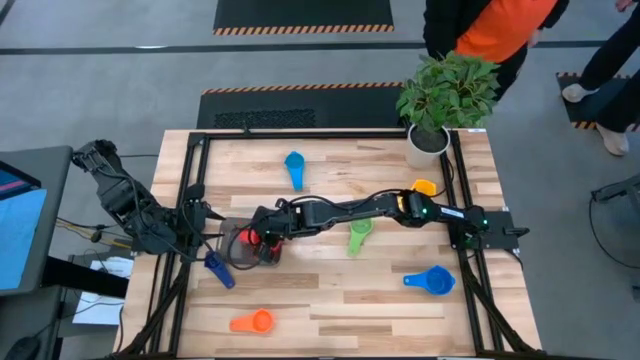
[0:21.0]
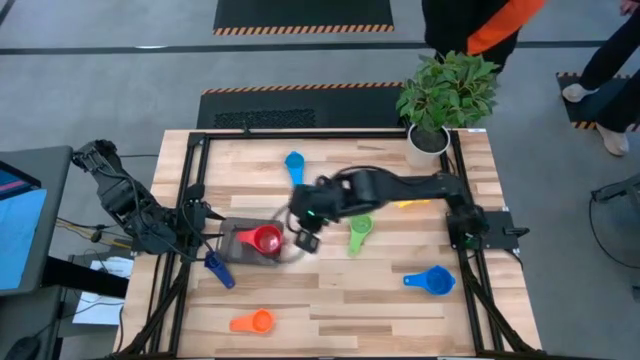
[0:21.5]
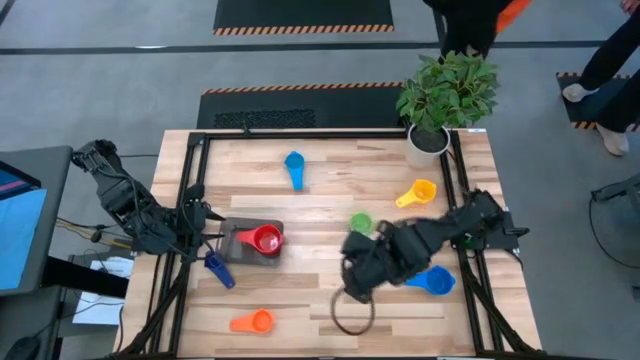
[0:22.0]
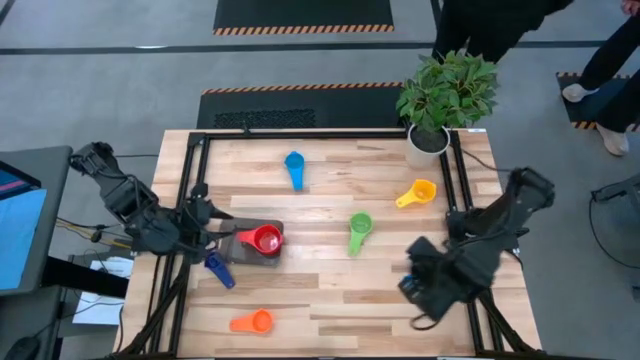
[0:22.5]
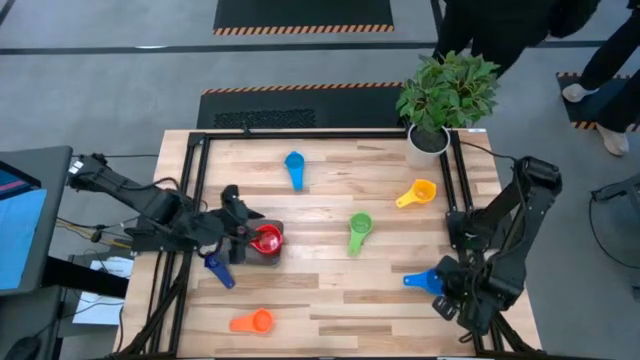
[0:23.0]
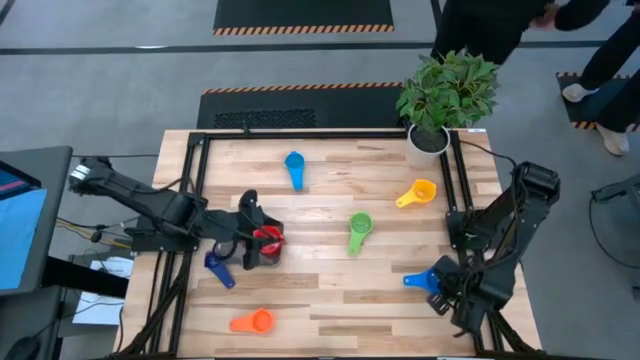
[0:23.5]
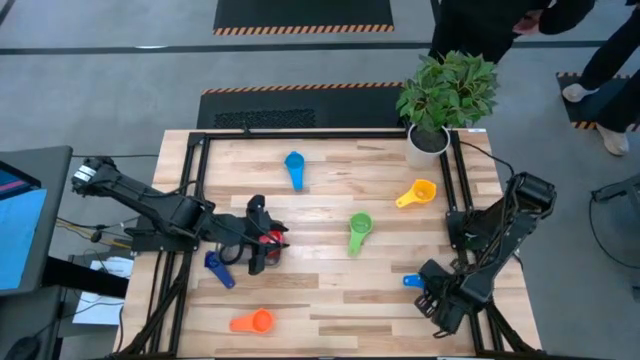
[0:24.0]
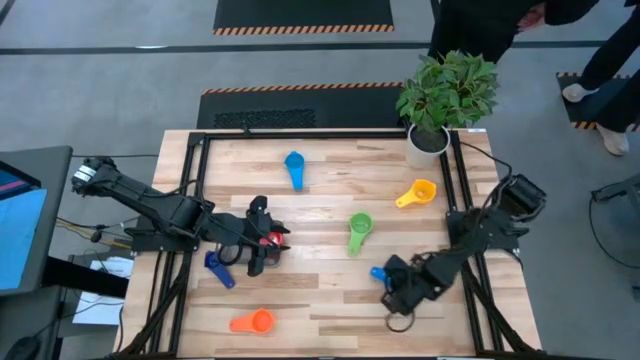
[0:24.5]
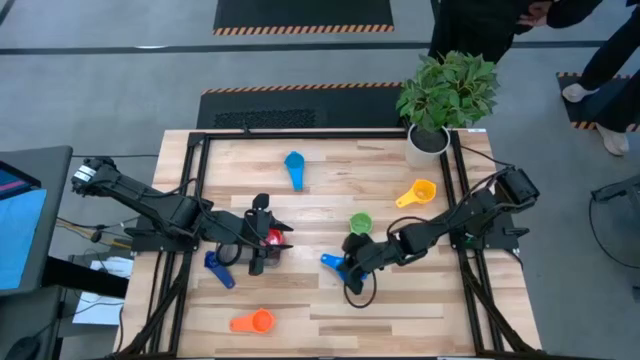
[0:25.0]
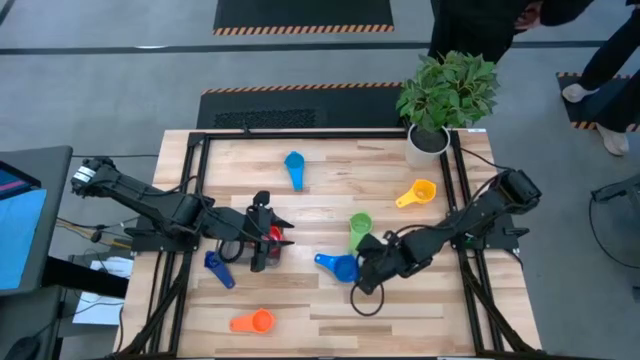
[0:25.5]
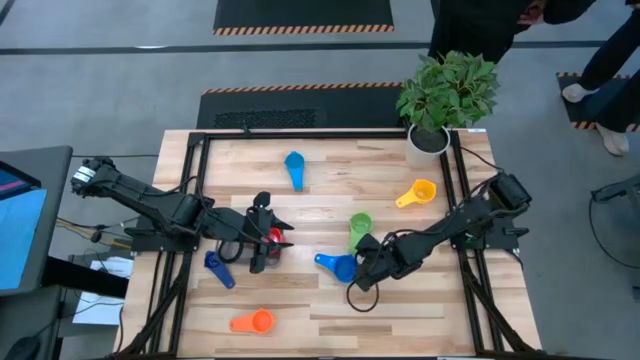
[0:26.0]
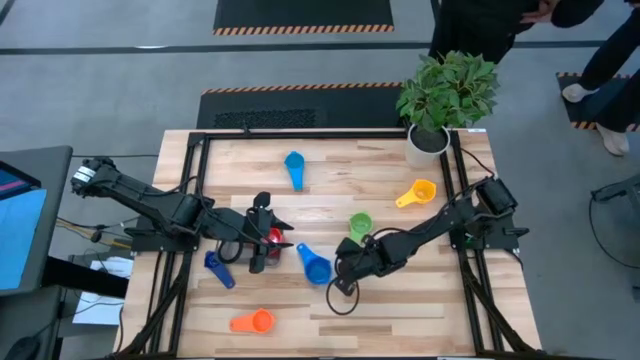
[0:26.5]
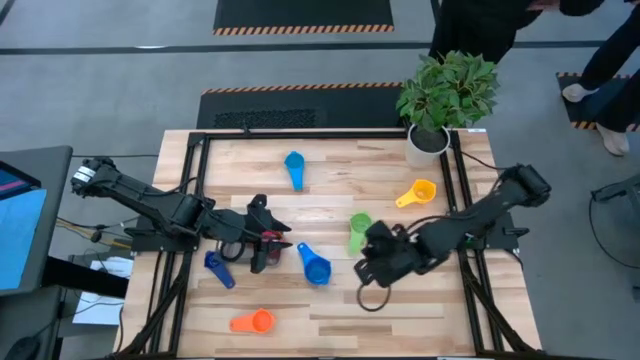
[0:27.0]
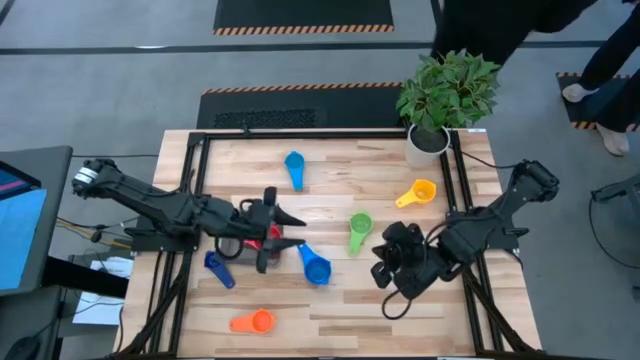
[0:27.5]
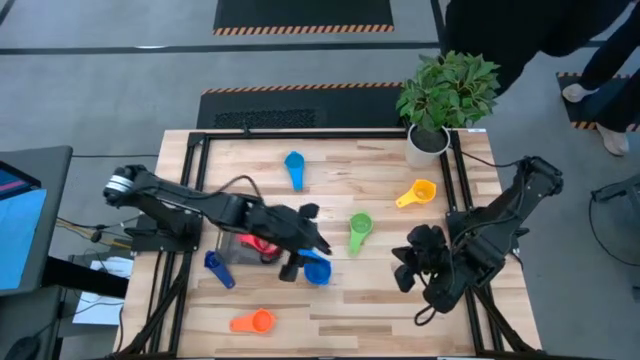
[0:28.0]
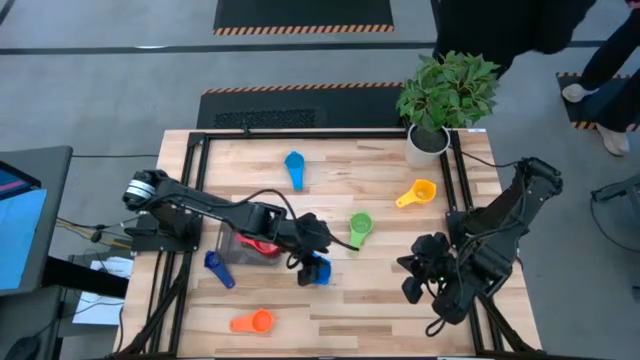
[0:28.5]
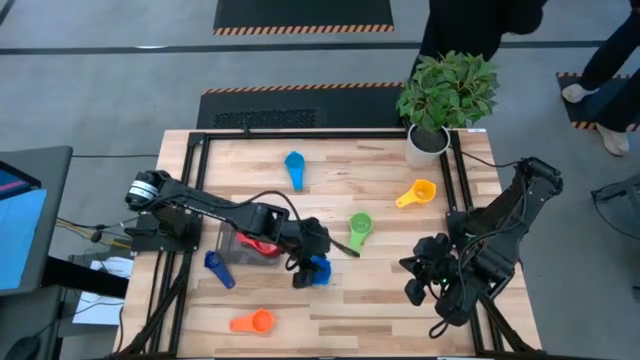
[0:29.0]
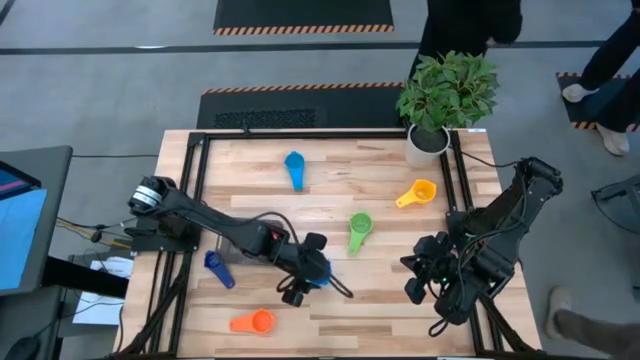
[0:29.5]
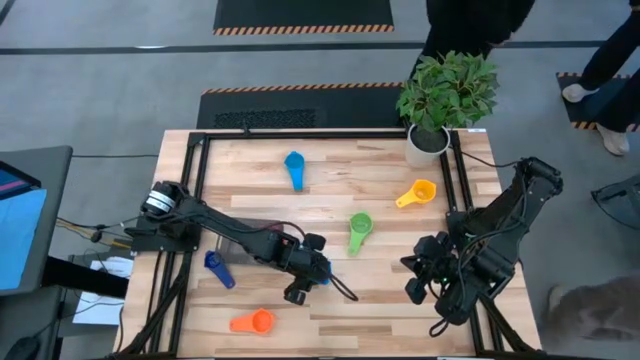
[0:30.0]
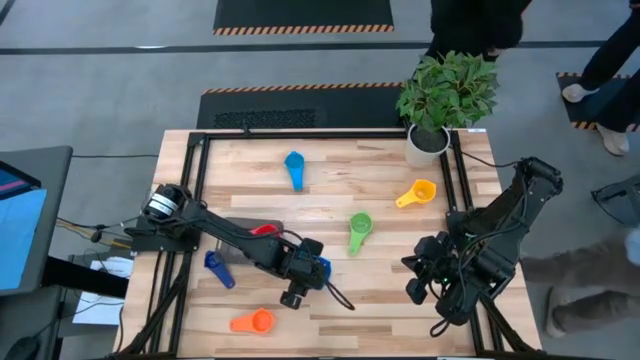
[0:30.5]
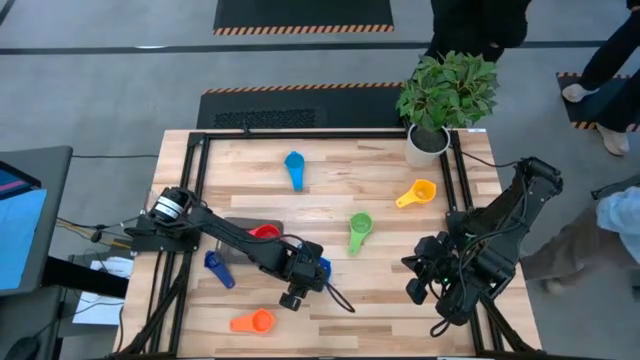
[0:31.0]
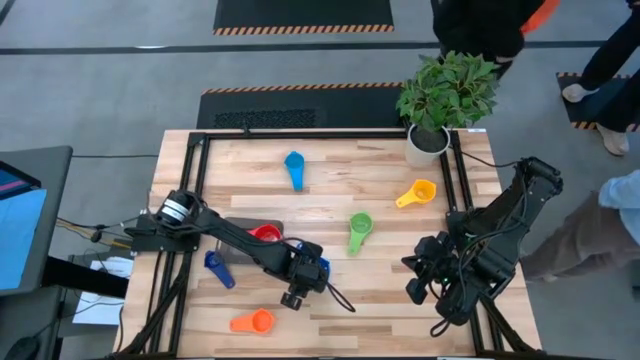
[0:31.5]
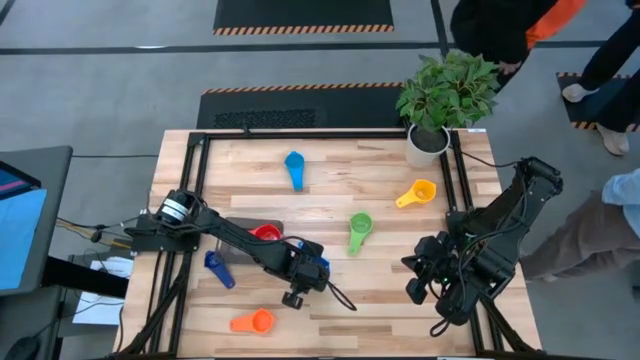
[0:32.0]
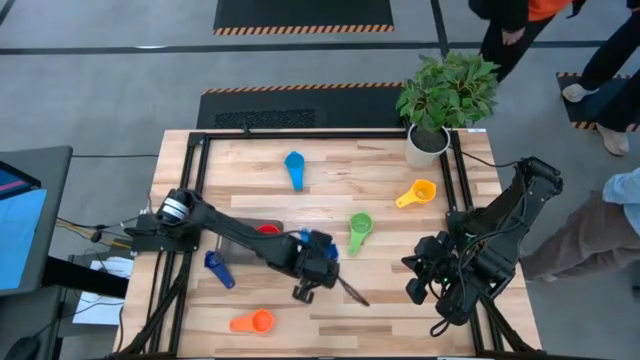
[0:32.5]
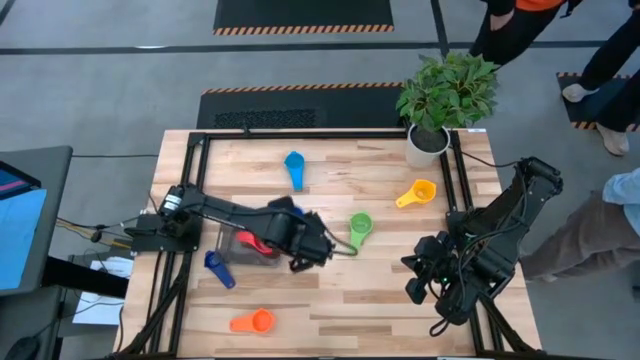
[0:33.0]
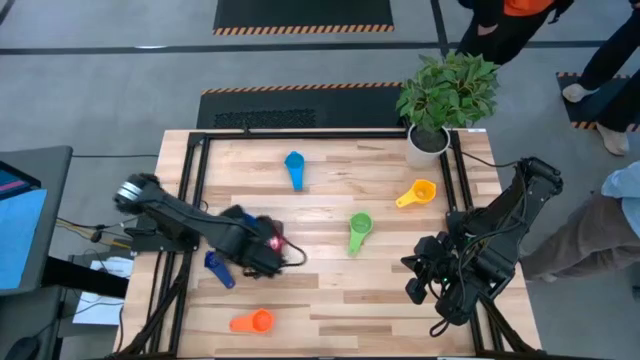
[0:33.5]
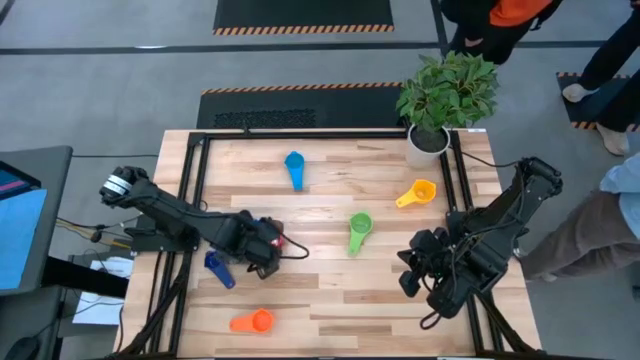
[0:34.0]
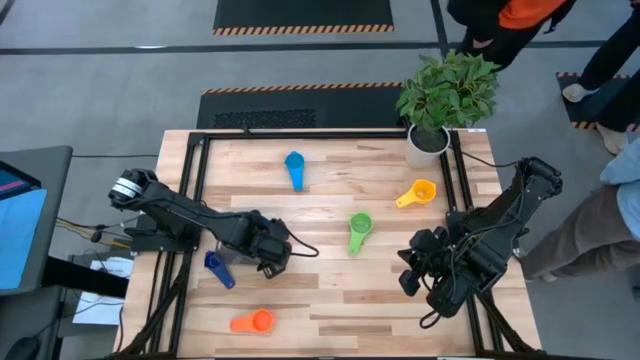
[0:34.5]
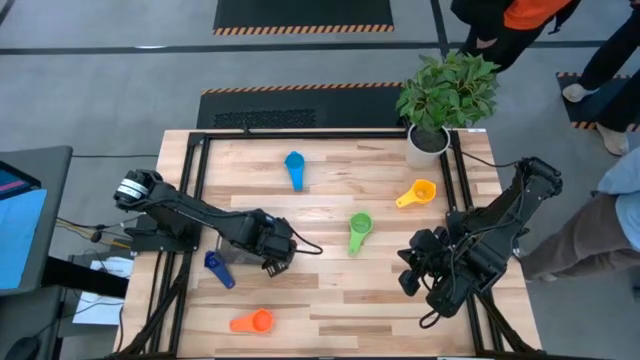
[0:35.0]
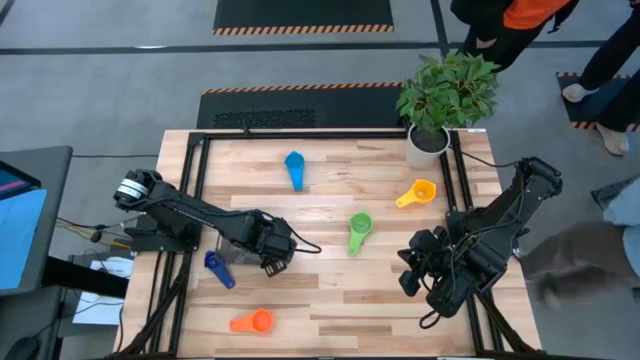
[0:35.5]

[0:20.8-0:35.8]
Task: Nest measuring cups in basket
Stack the blue measuring cup on top of the red measuring cup in the black bin

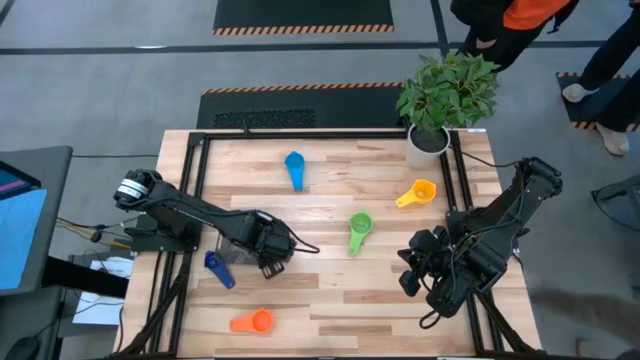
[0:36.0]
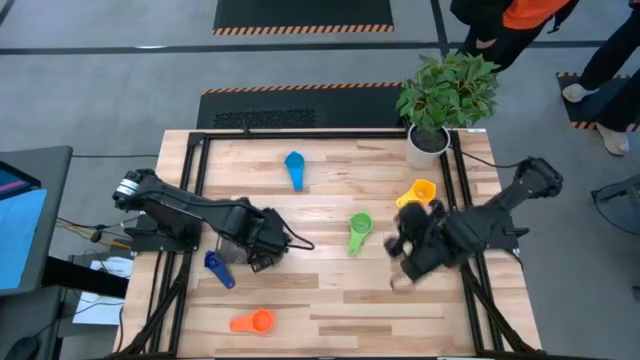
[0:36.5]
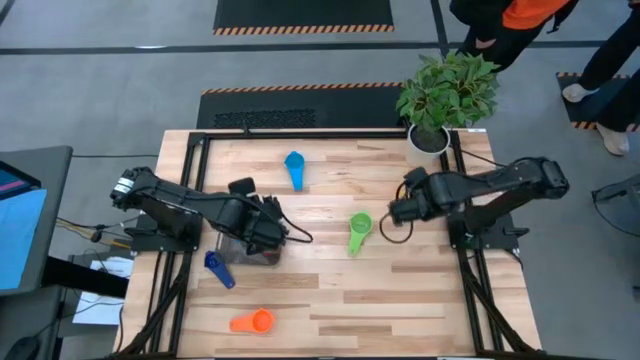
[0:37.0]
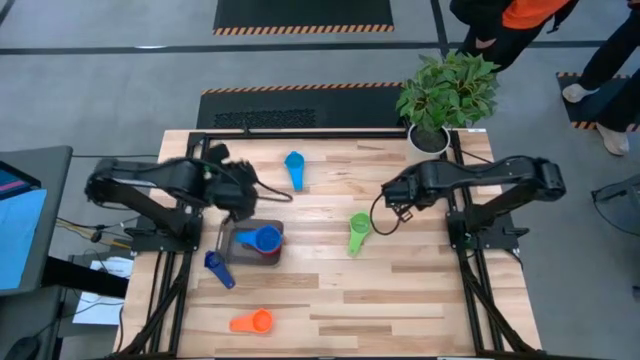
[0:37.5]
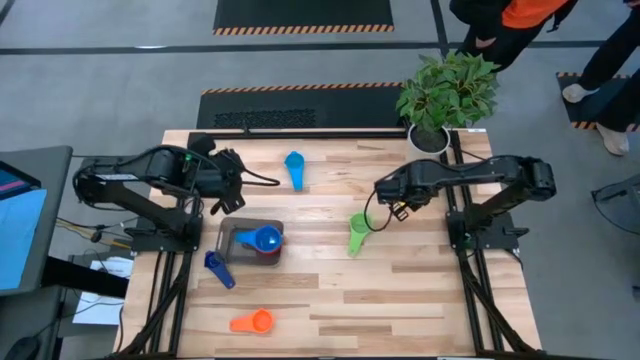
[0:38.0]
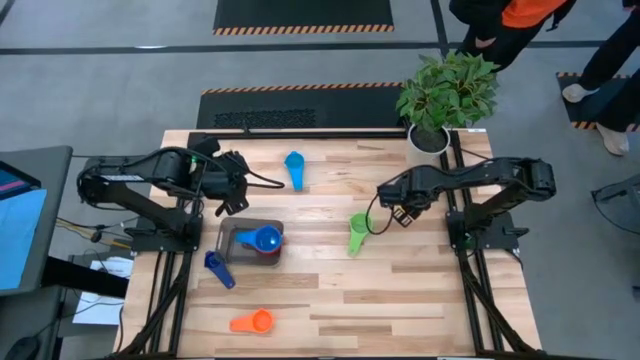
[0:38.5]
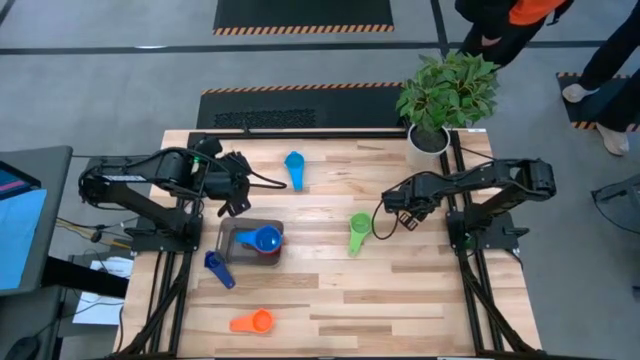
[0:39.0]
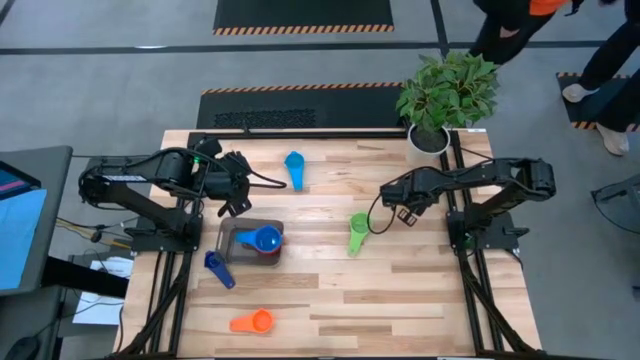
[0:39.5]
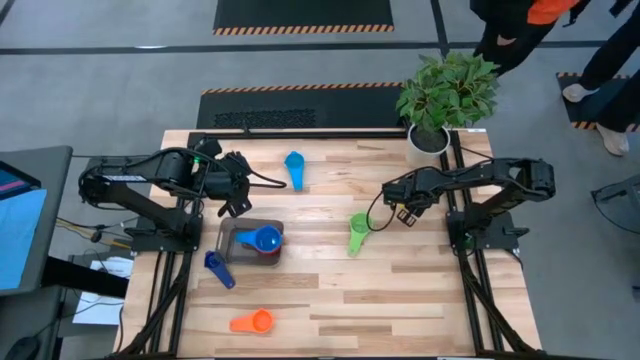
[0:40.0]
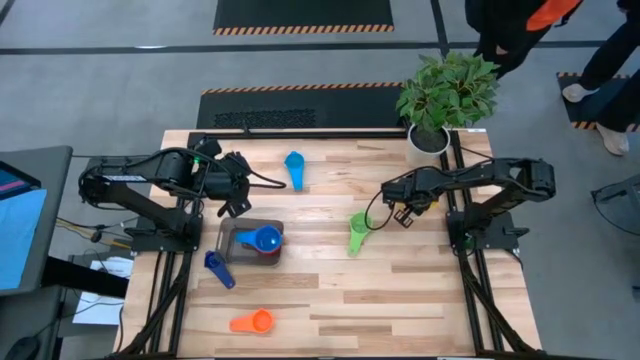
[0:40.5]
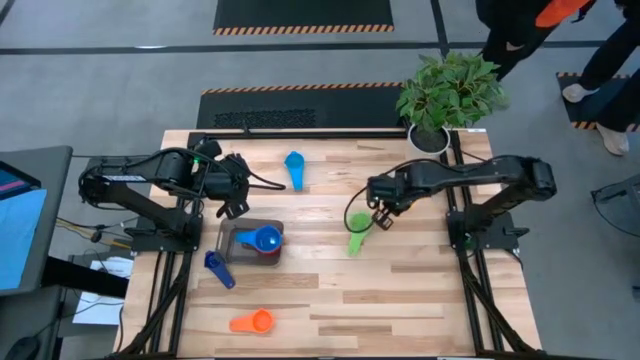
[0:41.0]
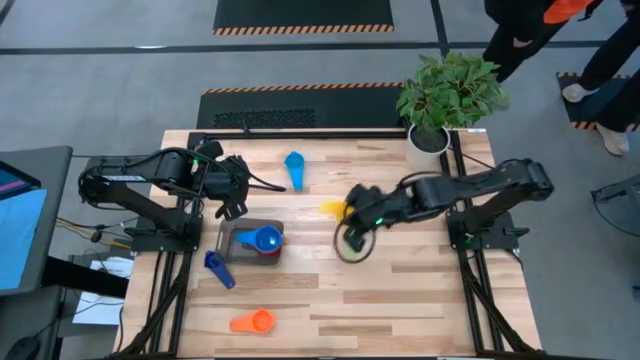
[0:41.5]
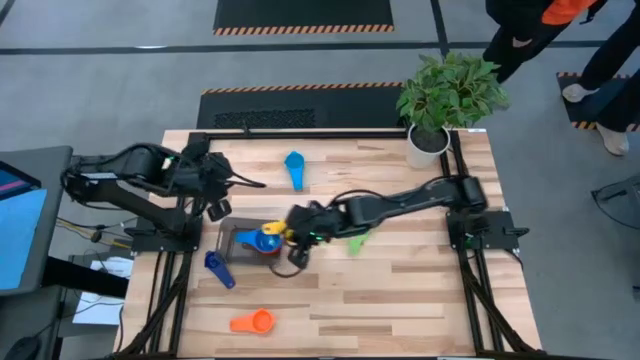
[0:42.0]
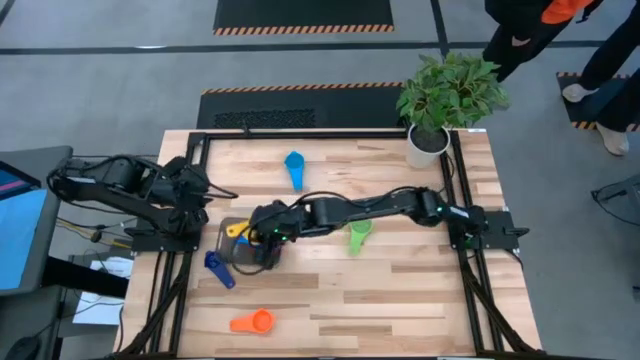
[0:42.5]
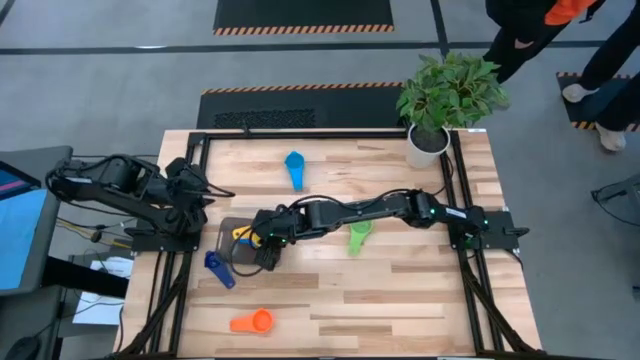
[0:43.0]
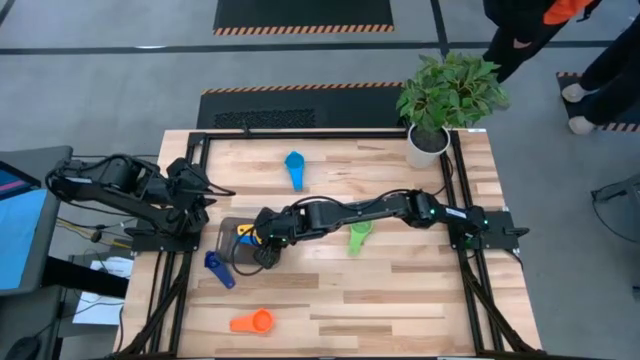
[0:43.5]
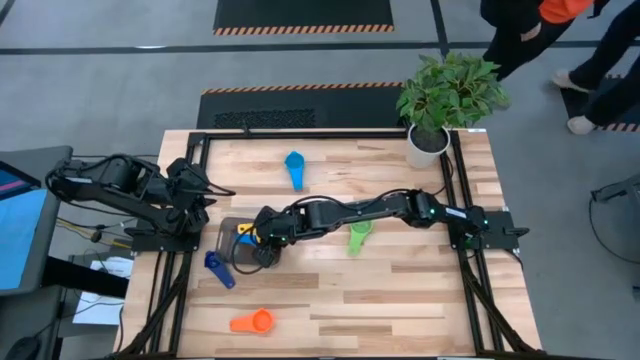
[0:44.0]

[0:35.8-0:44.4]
Stack the yellow measuring cup on top of the blue measuring cup in the black bin
